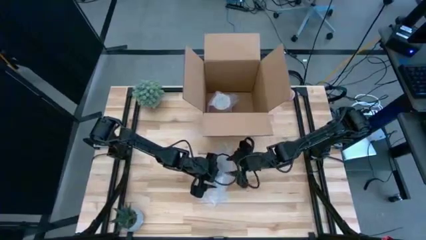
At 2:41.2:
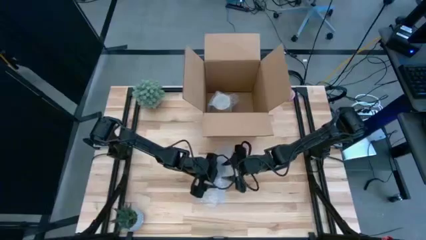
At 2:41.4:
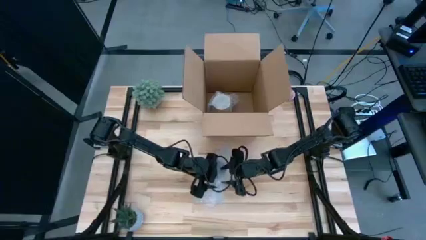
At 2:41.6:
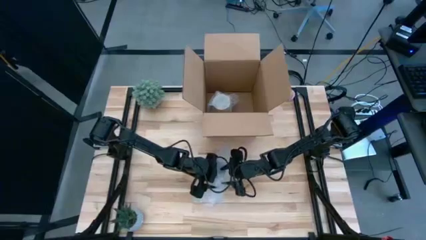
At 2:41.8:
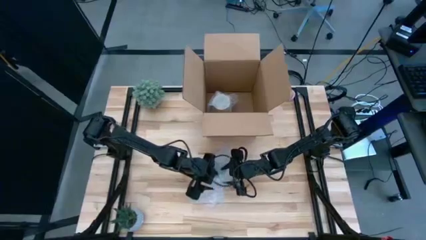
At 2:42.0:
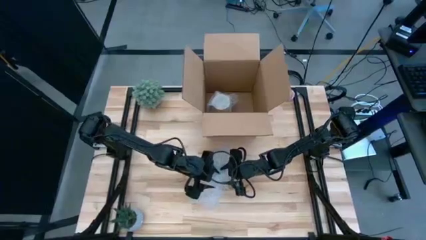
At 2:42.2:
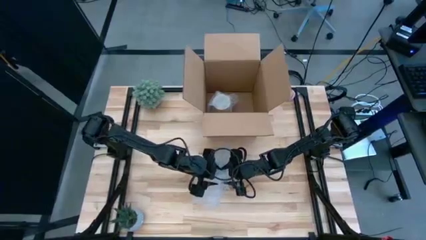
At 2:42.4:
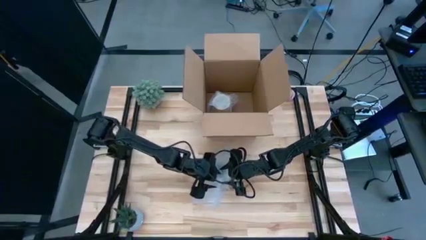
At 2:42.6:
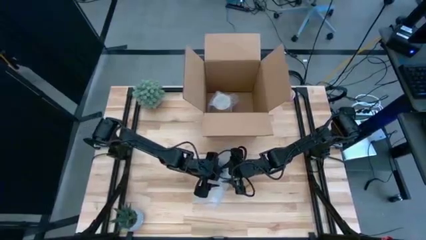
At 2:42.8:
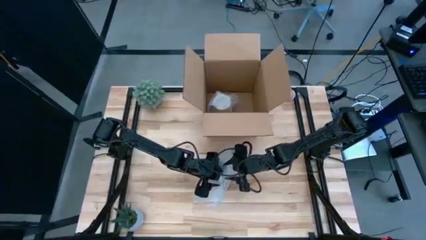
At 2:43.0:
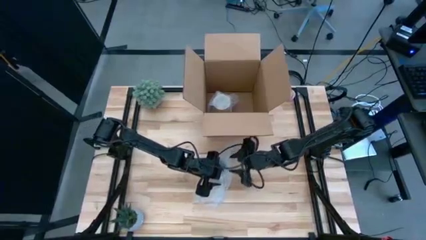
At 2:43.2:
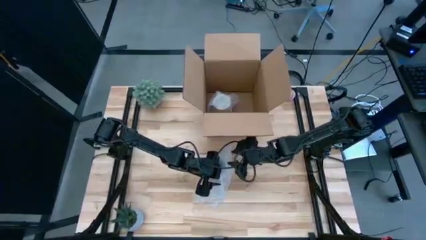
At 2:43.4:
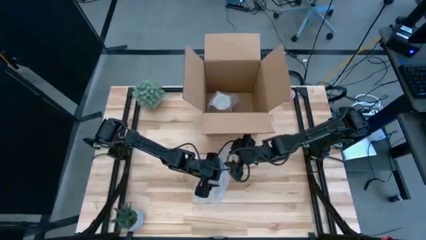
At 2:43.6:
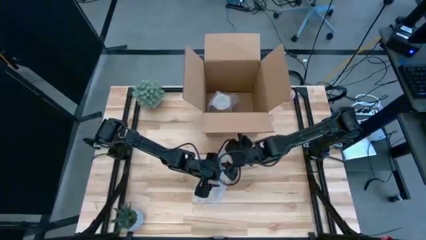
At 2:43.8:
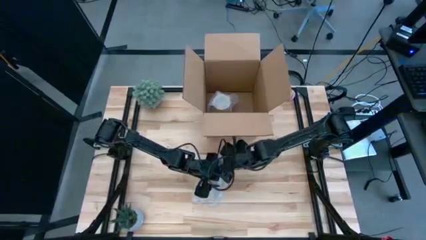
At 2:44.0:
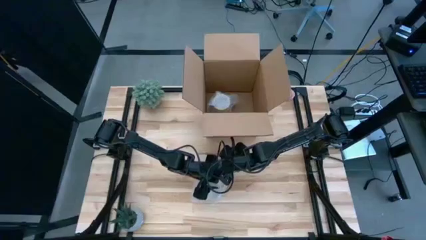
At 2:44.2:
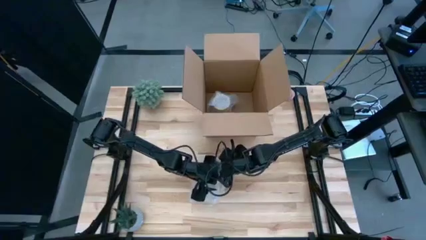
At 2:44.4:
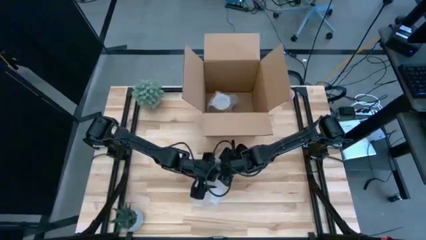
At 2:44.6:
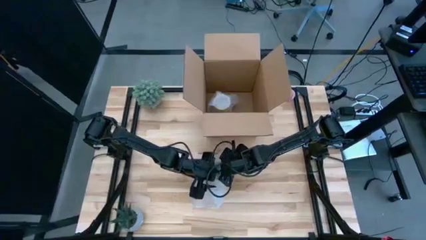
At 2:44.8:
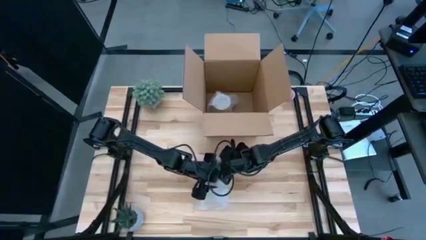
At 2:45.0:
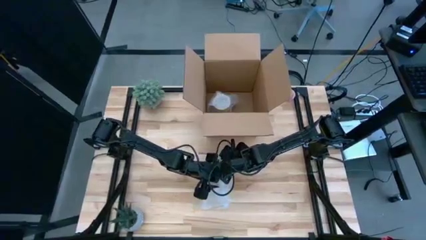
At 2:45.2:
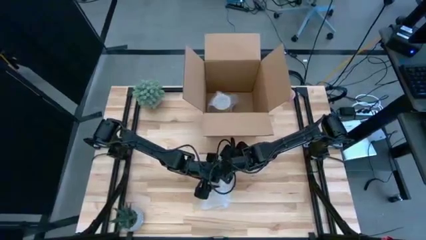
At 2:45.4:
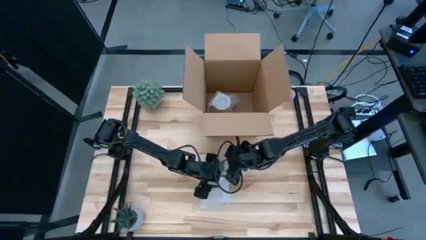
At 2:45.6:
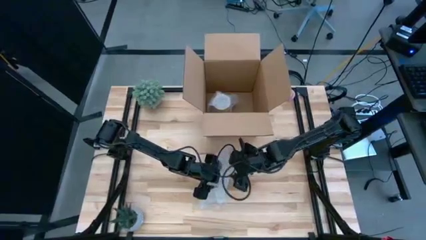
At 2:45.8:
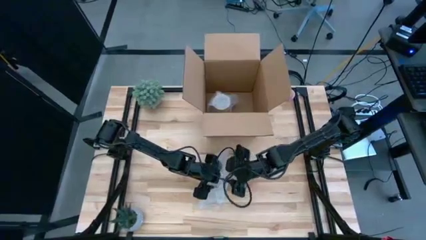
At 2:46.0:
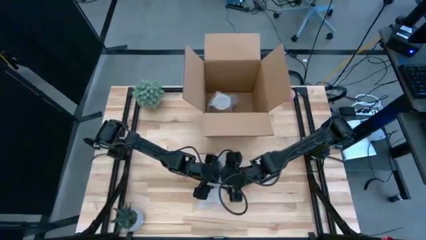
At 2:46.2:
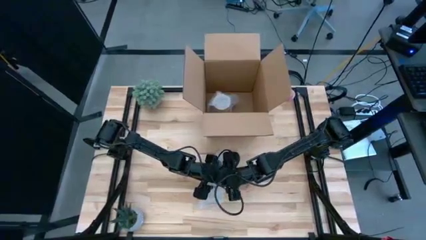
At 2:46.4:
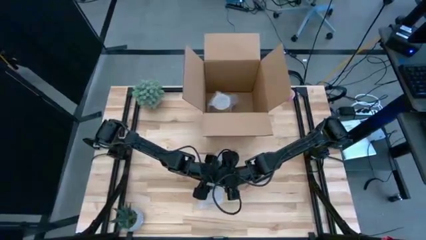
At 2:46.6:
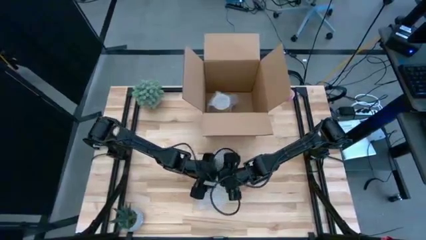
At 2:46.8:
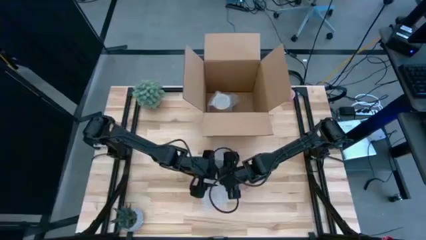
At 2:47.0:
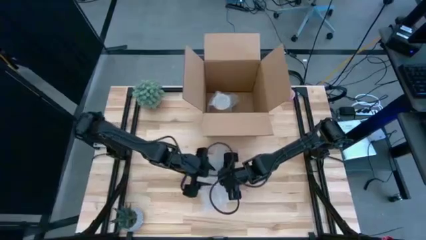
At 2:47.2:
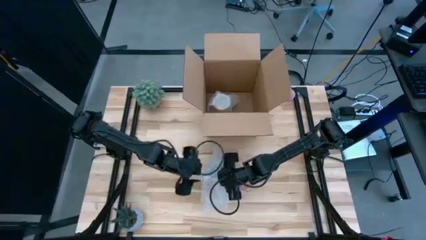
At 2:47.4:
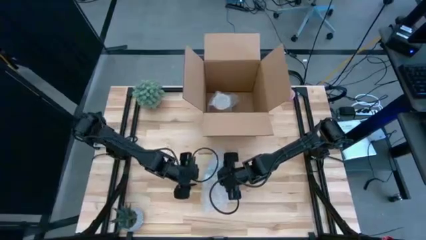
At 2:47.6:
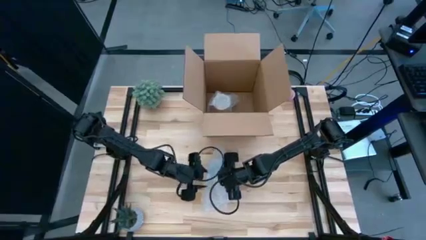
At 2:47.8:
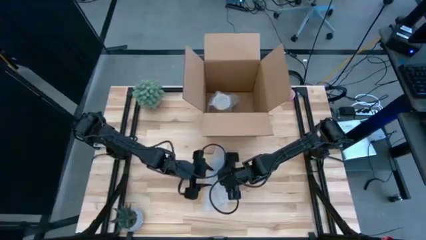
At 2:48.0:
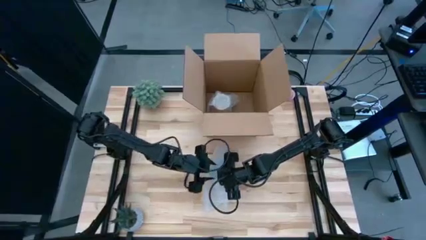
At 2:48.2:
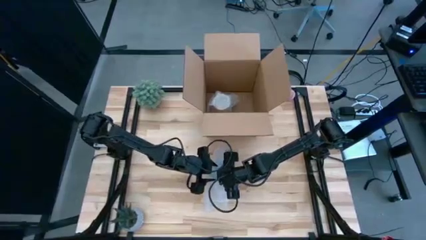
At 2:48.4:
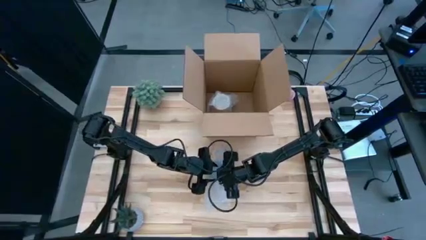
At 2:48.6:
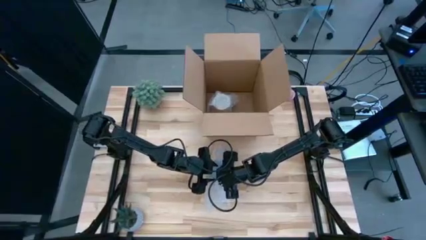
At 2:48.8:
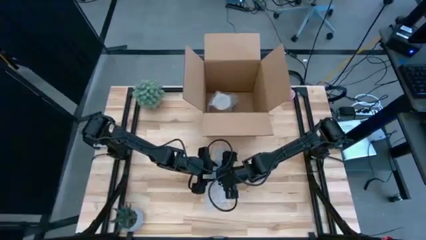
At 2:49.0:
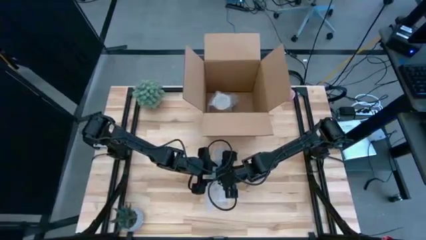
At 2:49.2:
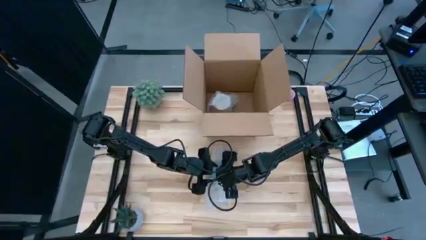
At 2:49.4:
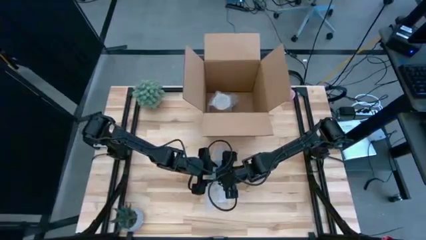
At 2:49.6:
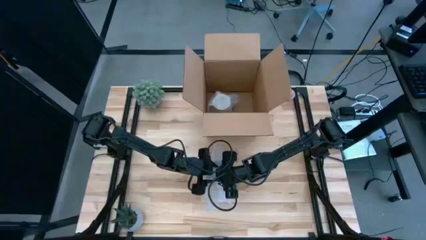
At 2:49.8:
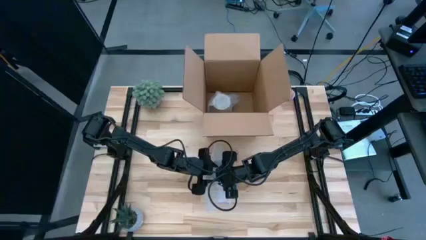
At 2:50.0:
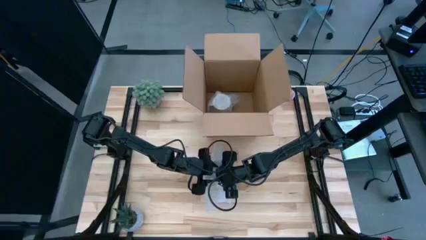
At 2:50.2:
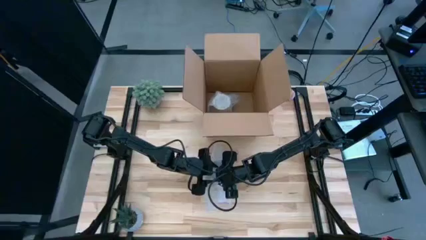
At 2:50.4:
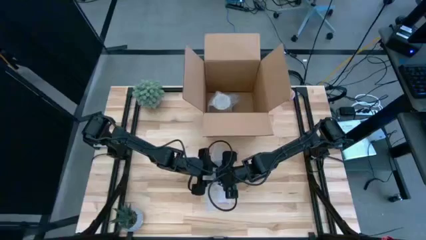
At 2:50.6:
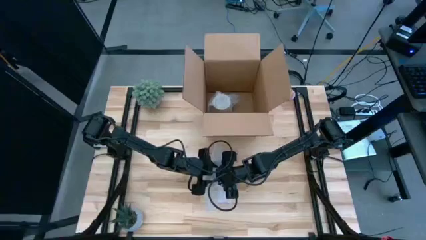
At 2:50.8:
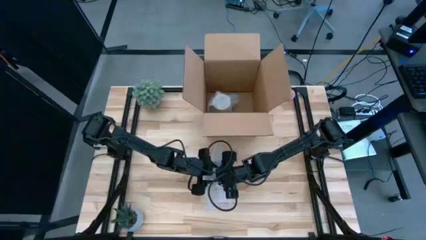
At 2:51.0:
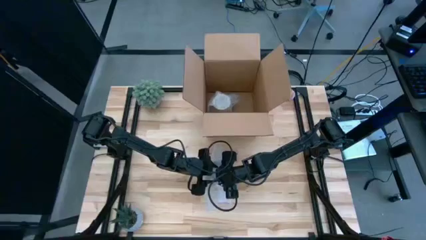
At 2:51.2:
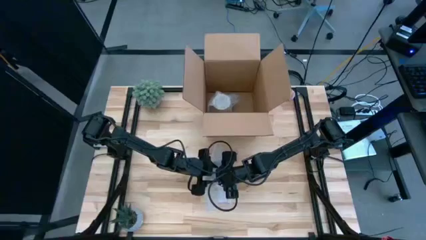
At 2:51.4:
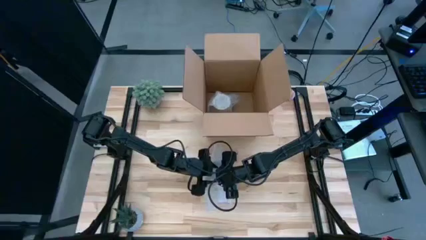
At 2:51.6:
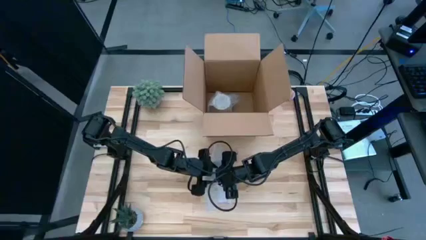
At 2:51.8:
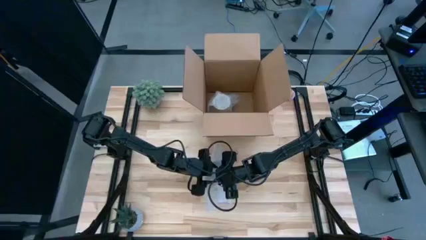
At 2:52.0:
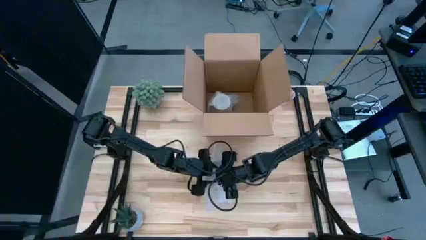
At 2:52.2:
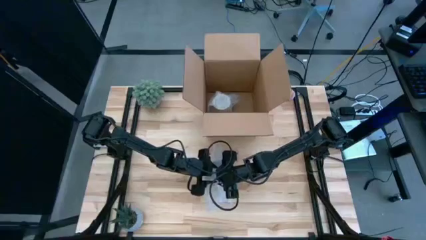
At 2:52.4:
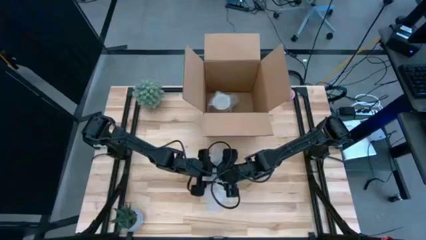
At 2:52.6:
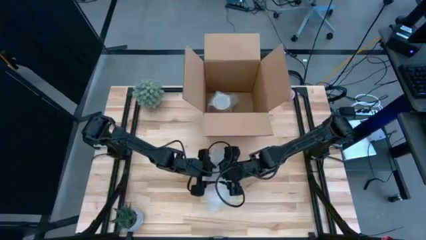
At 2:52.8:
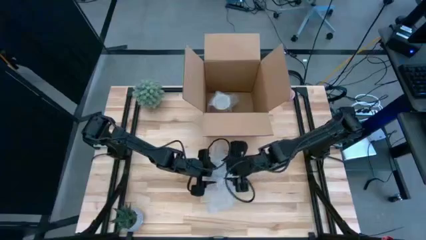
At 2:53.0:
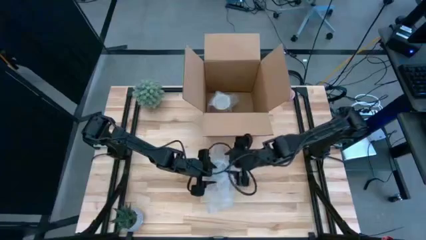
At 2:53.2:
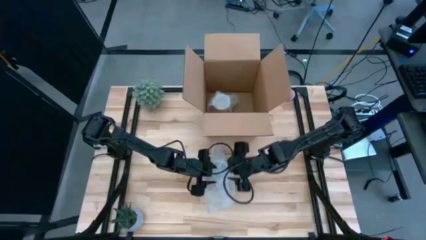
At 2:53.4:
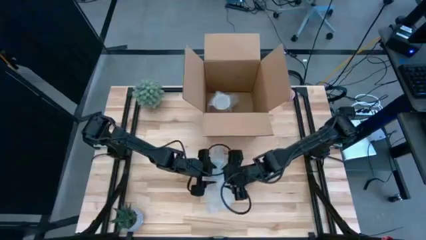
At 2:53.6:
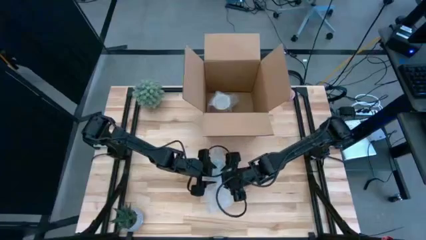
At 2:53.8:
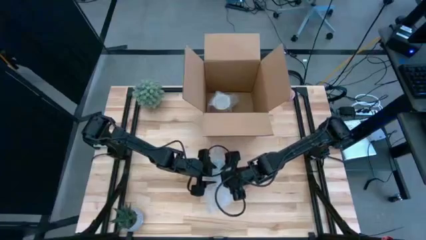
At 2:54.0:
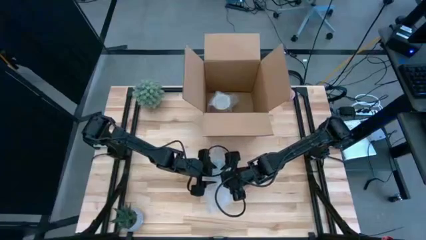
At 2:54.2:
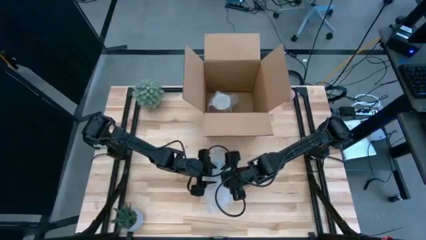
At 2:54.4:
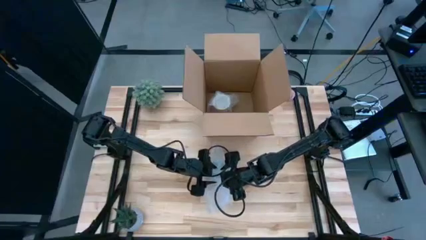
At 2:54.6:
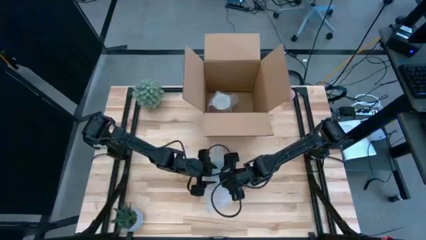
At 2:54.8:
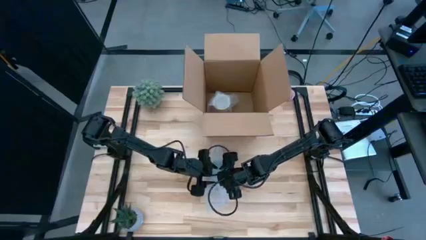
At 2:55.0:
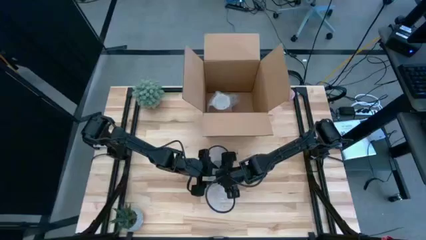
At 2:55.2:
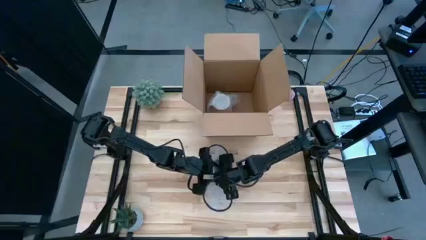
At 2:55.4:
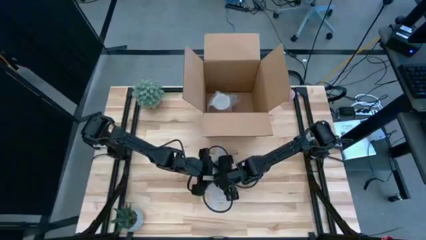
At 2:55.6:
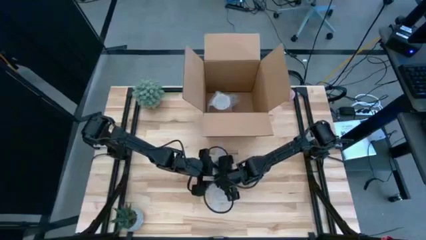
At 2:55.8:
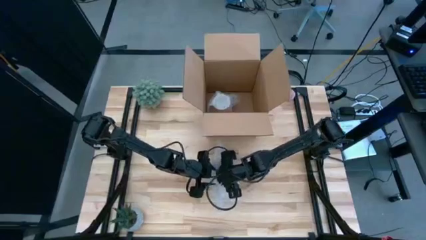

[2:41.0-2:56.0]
Task: wrap mug
Wrap the red mug with the bubble wrap

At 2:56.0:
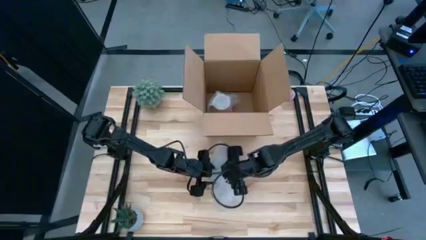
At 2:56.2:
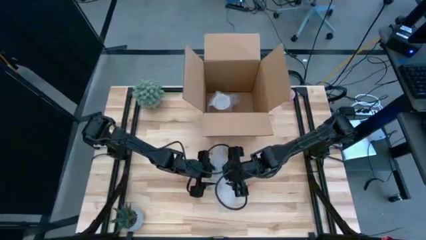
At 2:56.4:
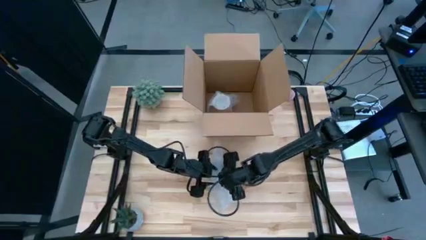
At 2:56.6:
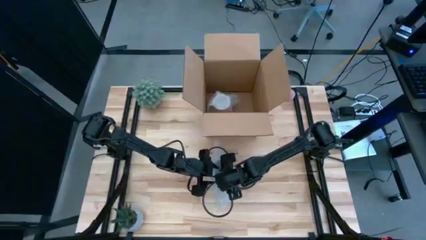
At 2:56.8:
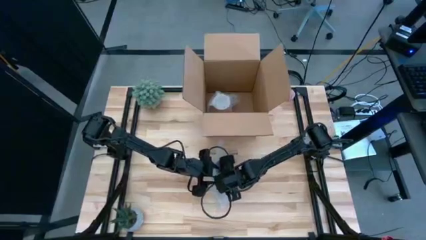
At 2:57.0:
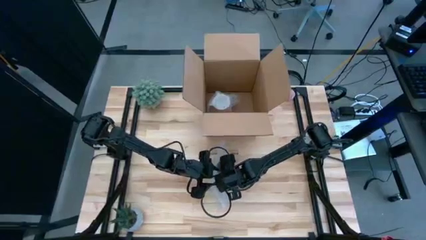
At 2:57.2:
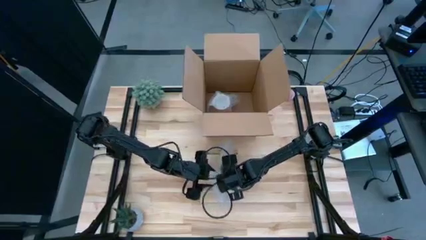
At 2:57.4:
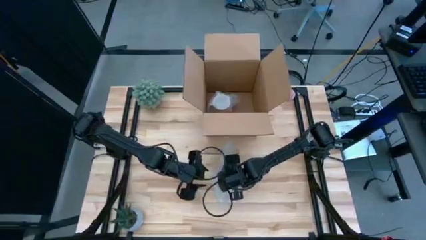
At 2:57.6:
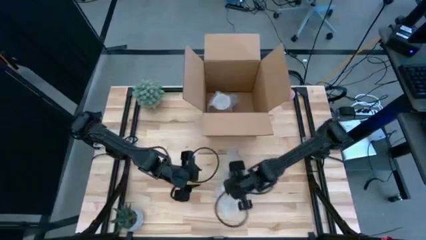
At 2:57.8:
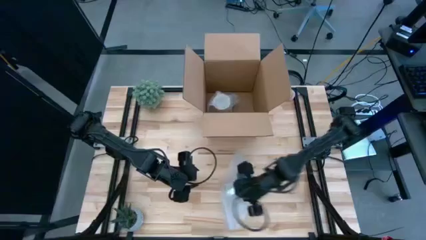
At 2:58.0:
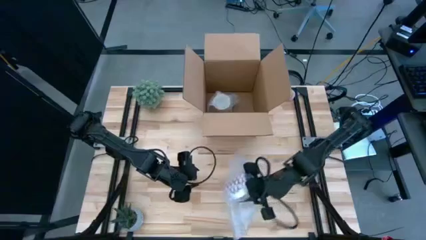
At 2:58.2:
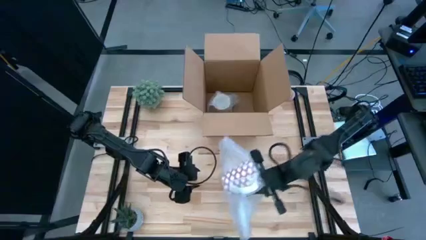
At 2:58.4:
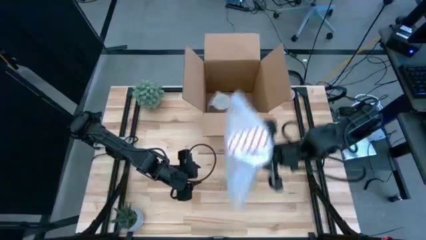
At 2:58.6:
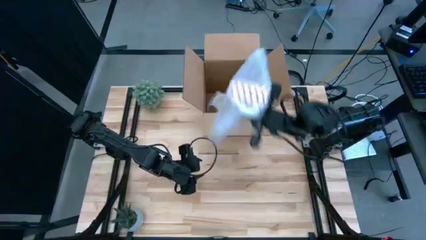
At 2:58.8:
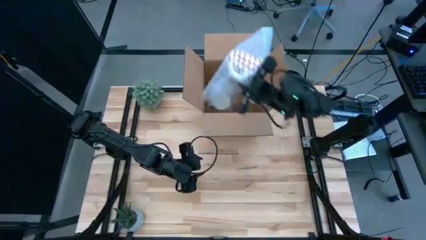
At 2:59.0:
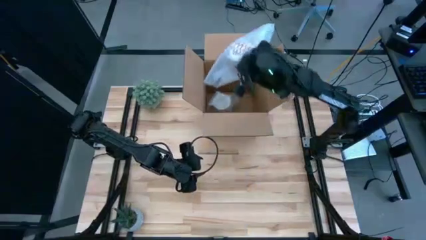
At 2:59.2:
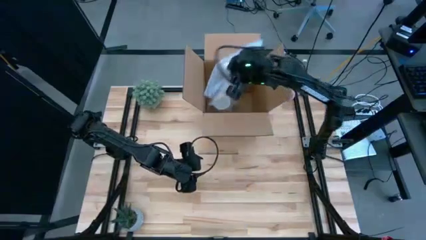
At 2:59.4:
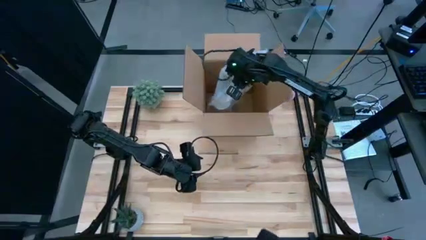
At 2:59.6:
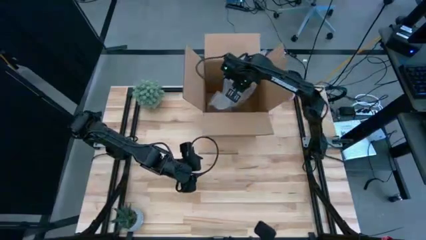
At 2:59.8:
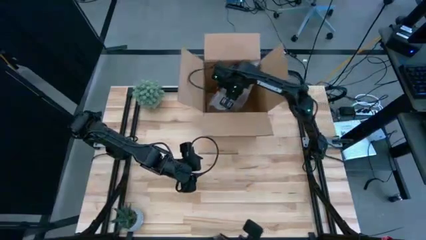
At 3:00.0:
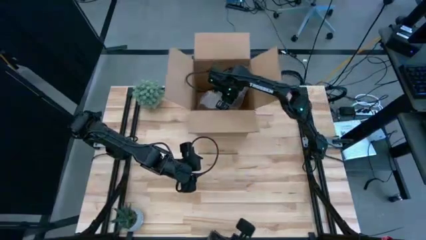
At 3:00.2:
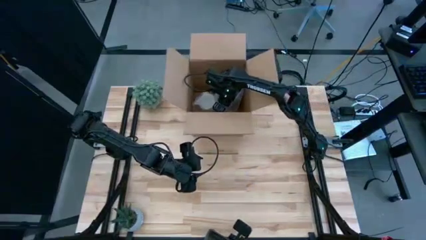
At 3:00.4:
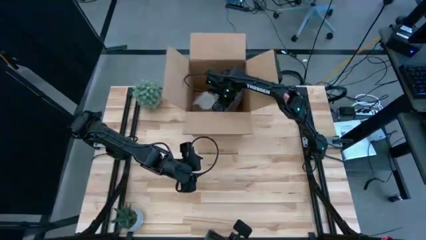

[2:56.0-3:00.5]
Put the wrapped red mug into the box
